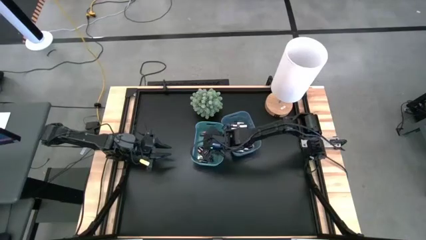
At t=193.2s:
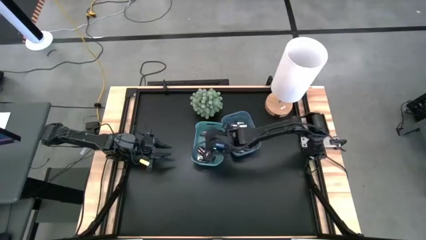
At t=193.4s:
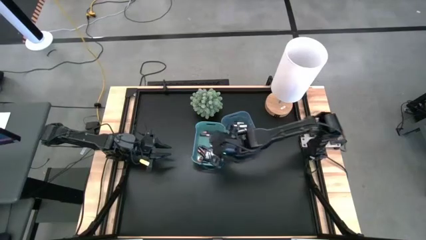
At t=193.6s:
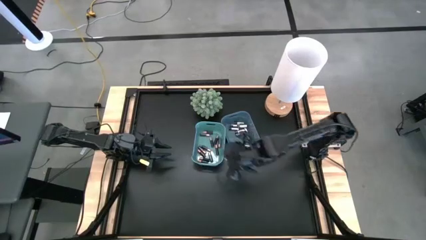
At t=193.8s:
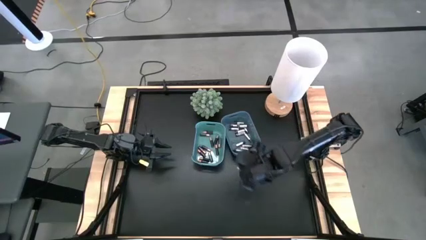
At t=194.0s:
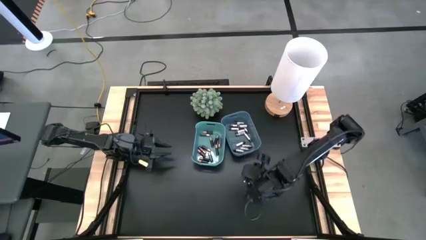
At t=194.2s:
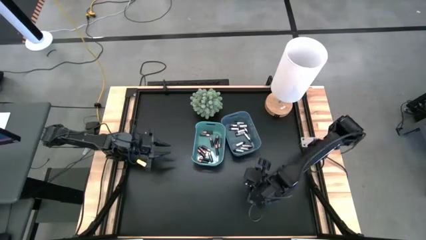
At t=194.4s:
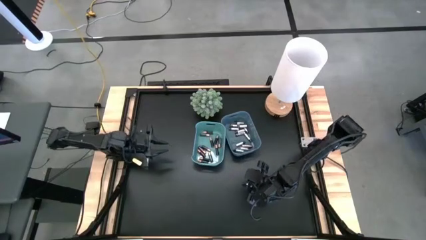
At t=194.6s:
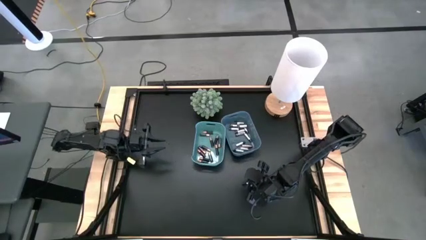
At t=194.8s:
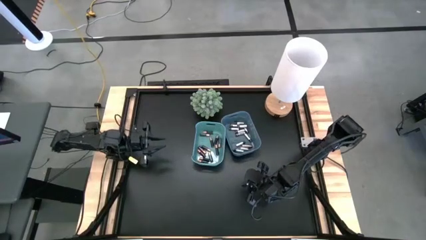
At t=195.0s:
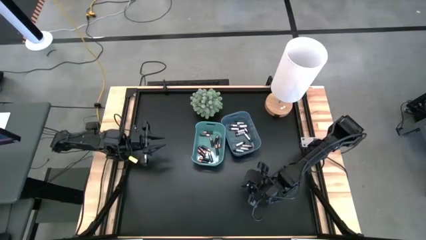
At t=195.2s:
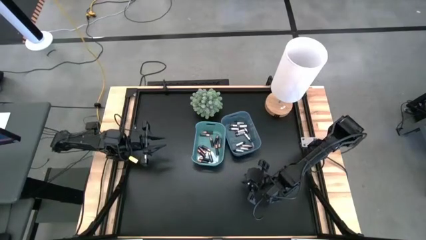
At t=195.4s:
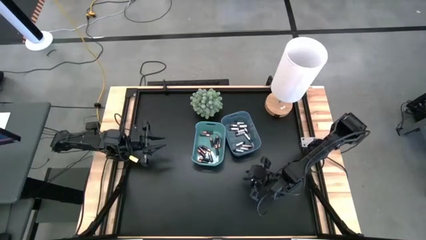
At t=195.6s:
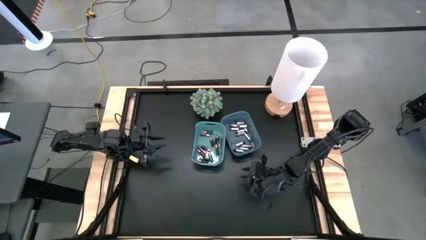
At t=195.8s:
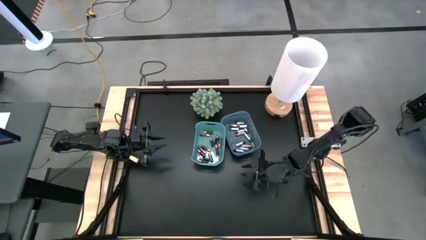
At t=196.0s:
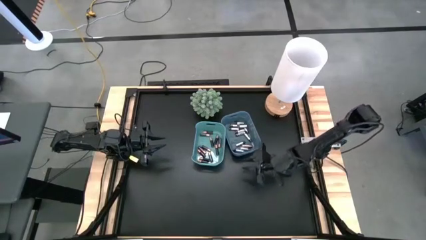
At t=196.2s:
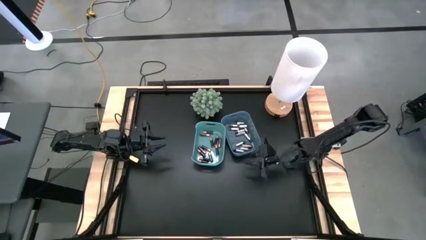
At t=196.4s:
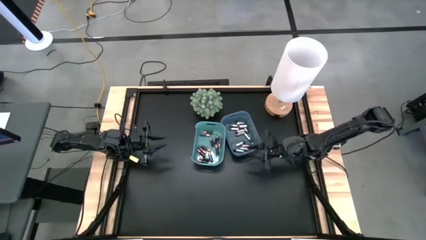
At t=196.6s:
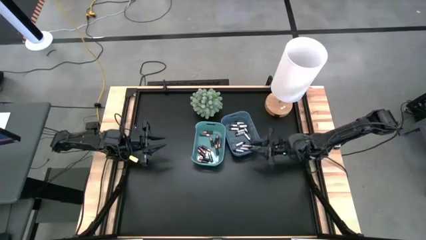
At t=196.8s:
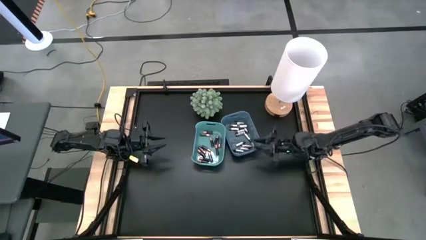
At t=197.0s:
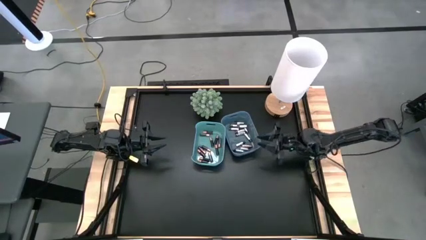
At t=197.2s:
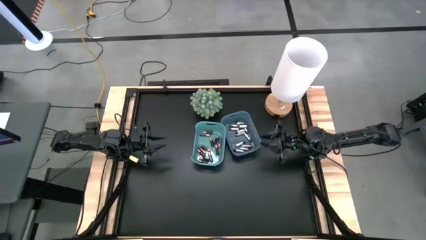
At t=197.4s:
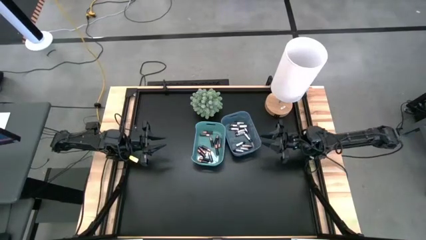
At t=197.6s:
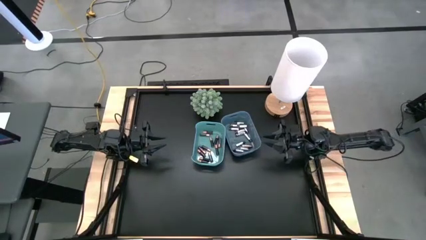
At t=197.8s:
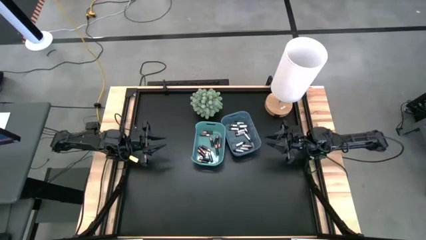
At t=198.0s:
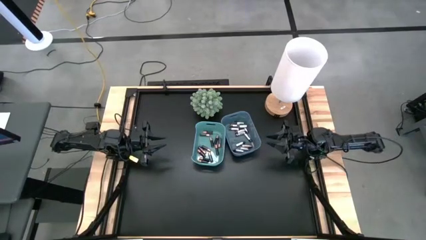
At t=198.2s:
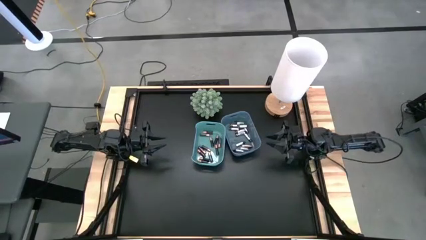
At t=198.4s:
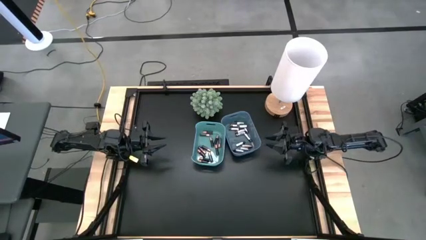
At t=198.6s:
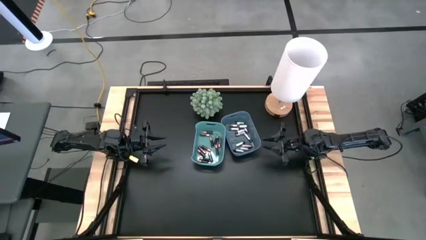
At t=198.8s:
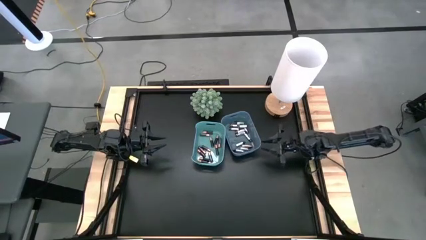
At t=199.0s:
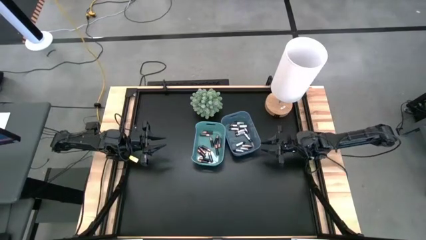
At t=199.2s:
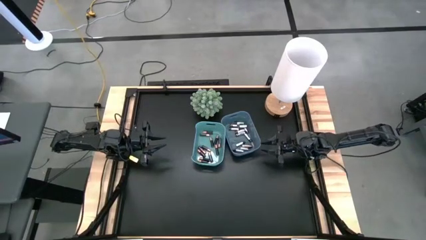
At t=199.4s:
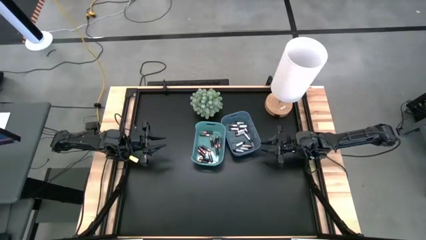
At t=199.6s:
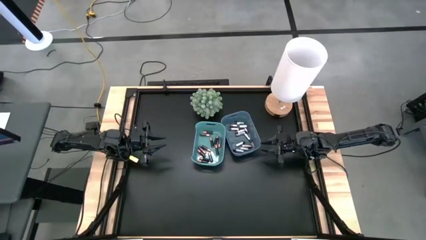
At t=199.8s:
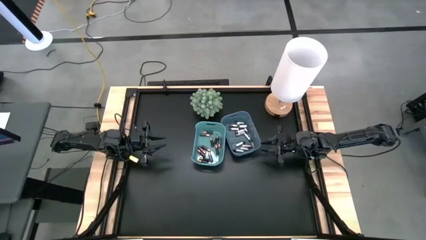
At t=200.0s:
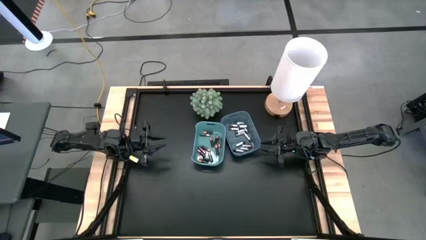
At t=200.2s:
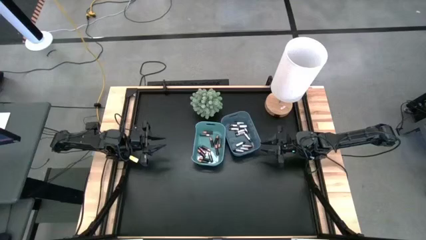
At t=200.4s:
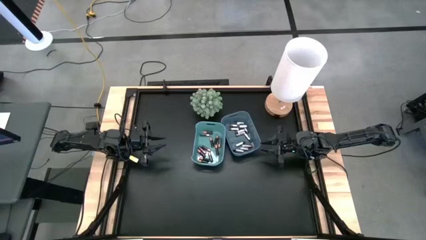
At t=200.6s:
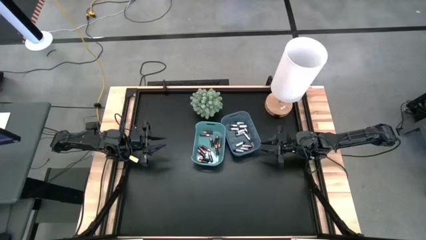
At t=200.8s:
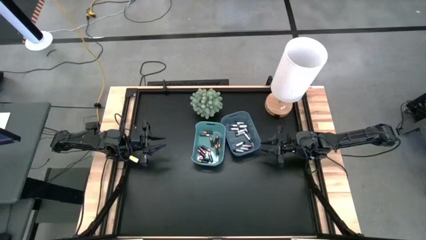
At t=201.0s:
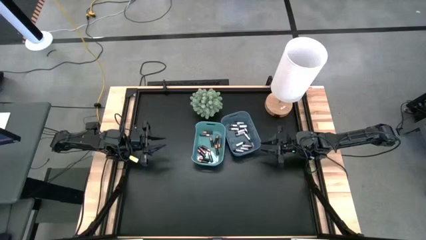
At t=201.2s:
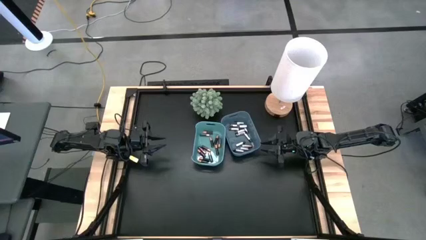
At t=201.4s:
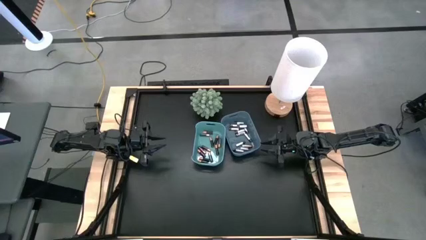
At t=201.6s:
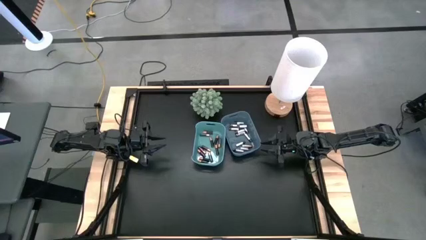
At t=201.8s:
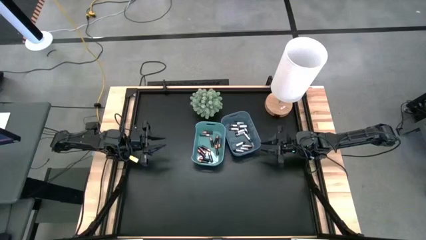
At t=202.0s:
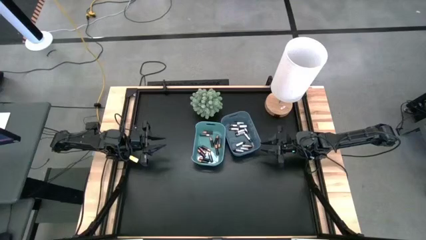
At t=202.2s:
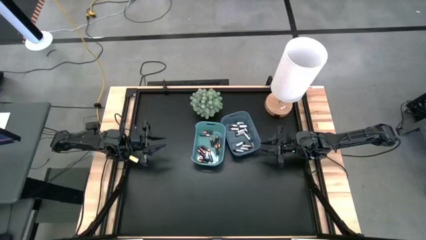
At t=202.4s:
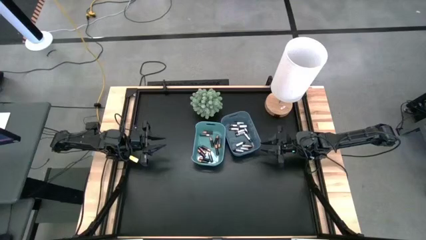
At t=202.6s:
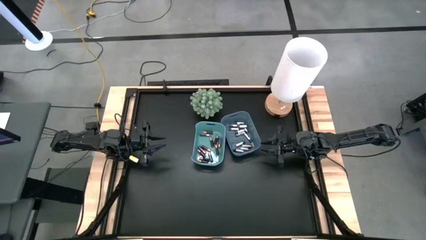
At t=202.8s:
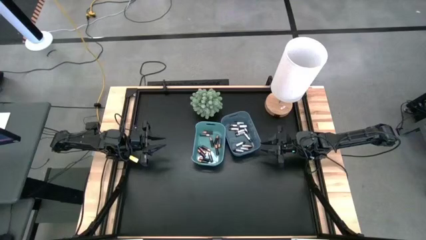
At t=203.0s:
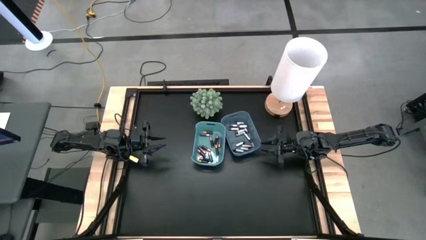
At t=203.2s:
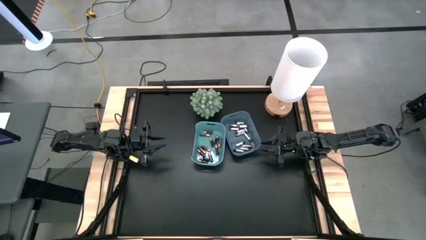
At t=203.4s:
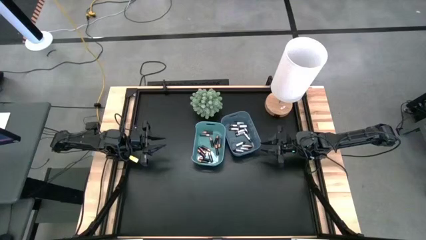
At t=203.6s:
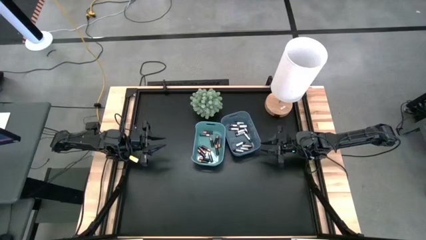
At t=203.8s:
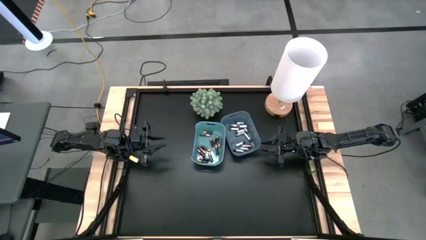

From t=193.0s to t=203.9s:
Task: Sort batteries
Return to Home Position

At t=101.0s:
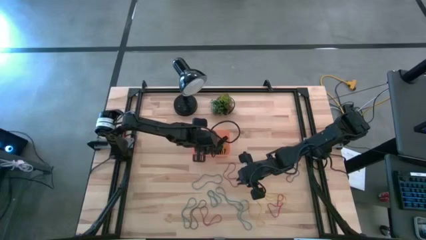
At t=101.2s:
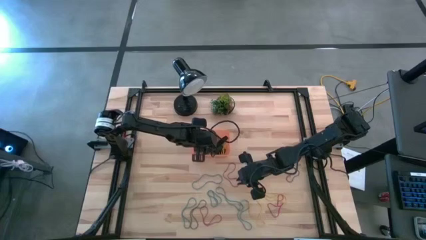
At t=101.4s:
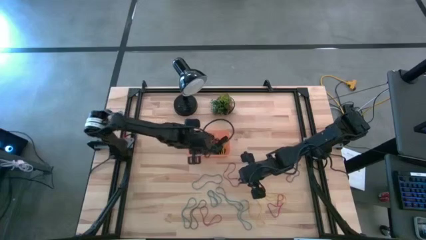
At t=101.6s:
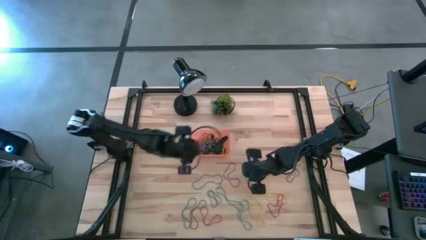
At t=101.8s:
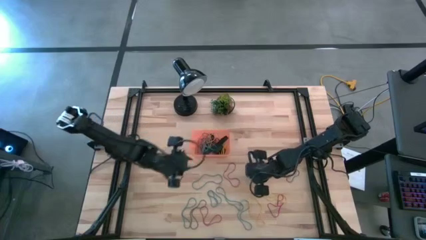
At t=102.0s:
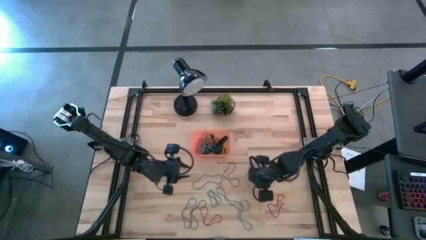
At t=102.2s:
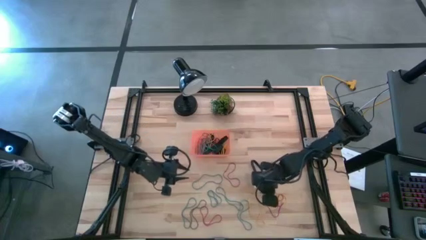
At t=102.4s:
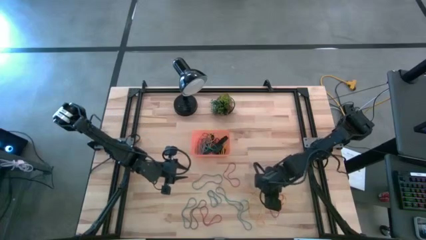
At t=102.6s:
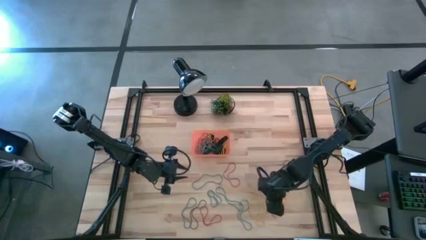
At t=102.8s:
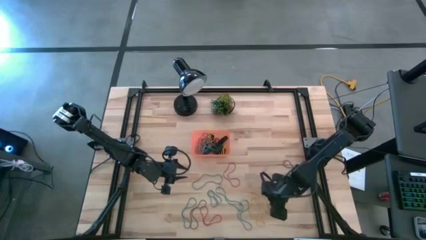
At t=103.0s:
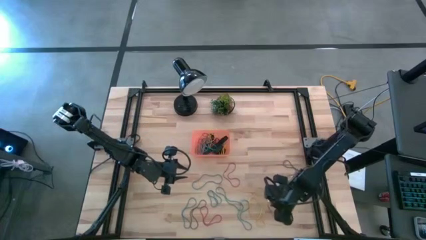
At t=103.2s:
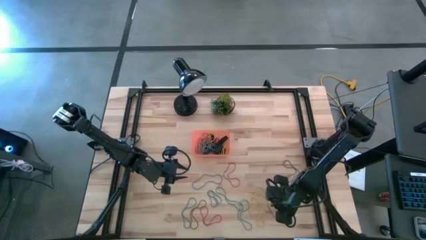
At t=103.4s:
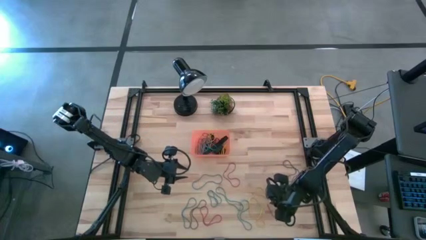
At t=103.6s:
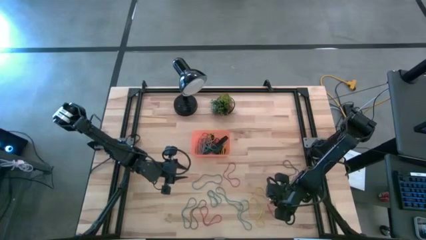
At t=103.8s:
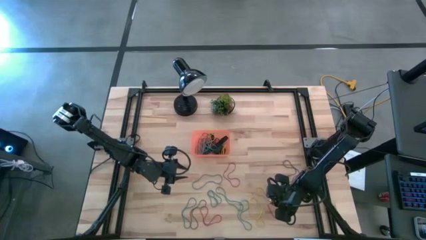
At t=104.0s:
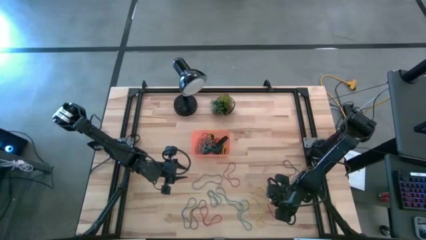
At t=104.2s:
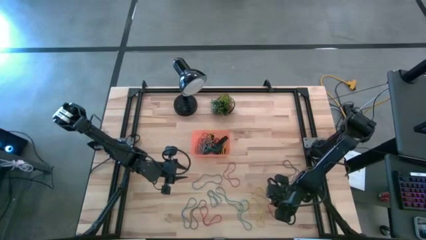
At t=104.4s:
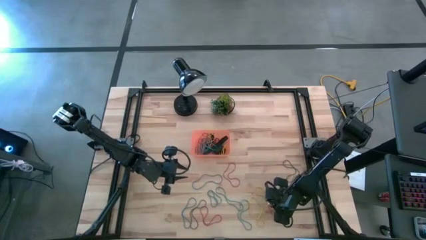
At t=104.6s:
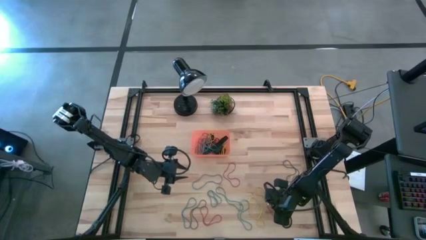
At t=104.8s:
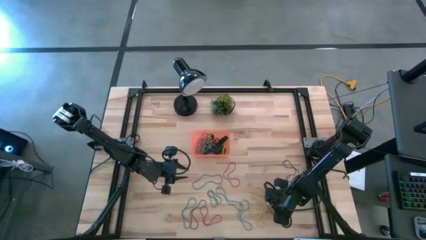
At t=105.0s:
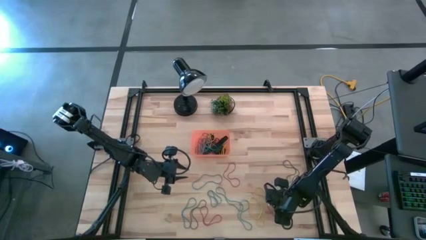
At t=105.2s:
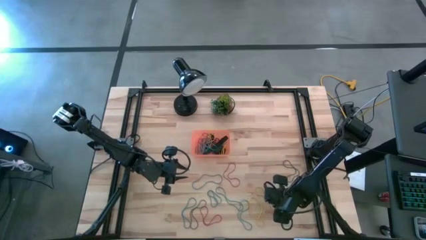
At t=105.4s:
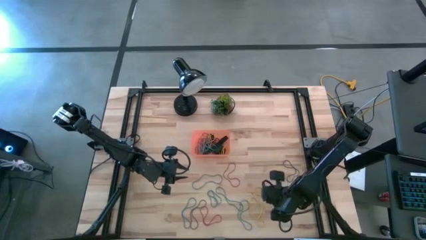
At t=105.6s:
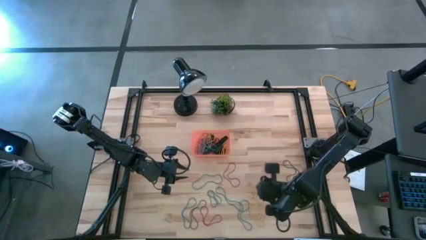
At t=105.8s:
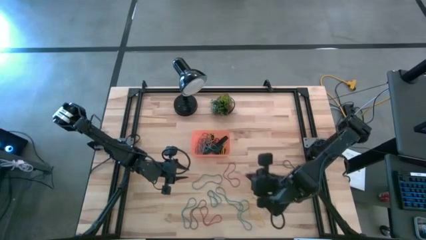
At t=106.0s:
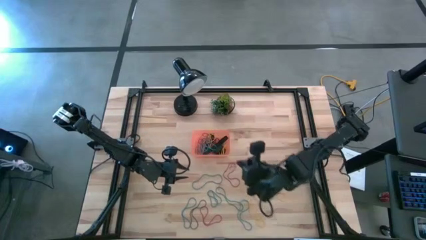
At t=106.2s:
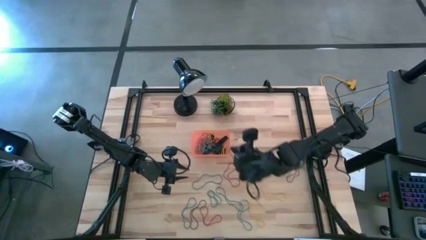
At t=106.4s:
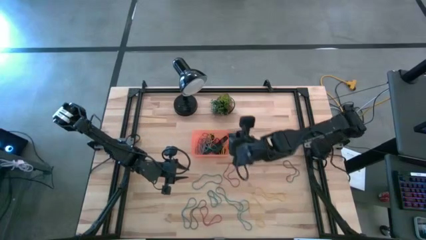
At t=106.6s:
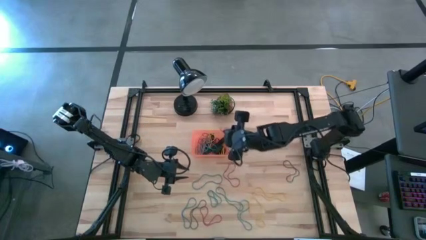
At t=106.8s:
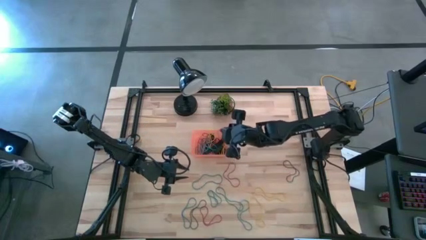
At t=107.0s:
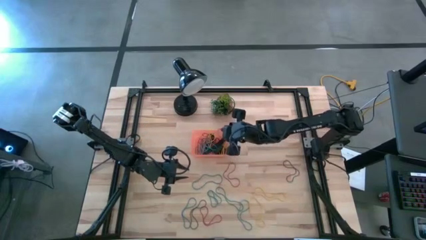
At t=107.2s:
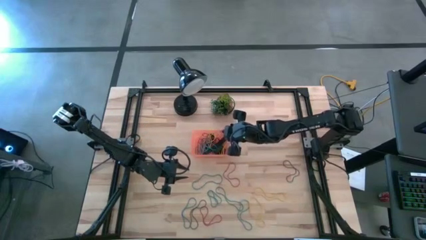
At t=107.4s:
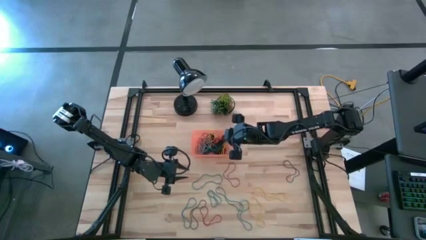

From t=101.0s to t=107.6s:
Task: Pick and place rubber bands into bin
Put the red rubberband into the orange bin
